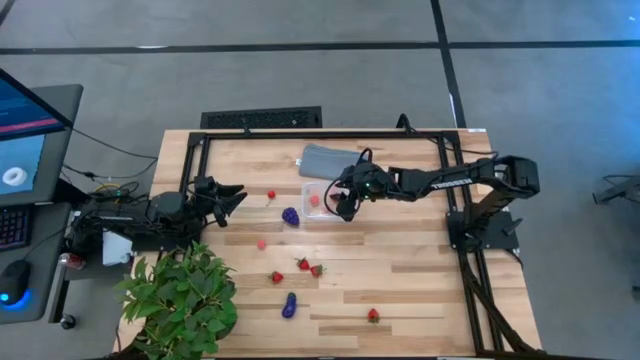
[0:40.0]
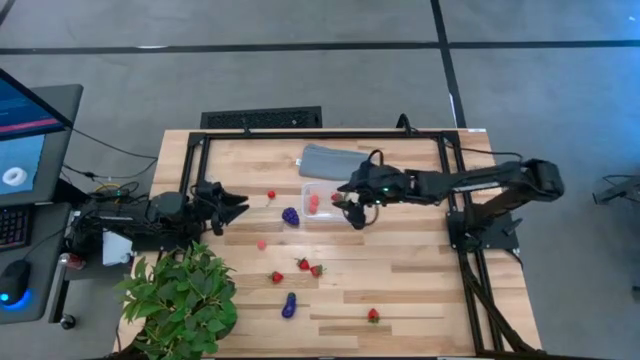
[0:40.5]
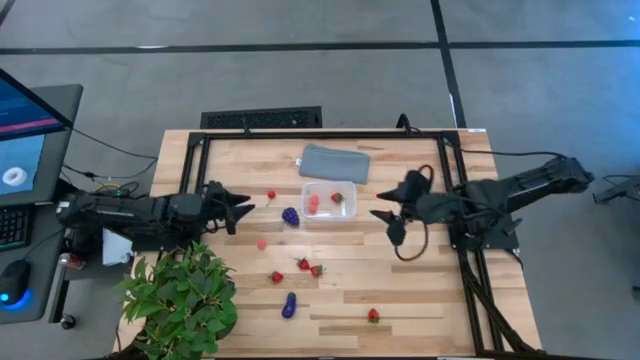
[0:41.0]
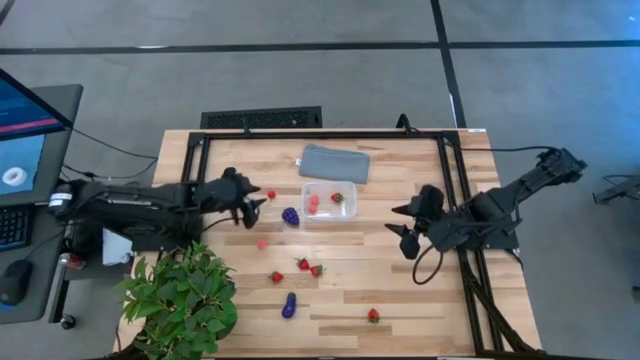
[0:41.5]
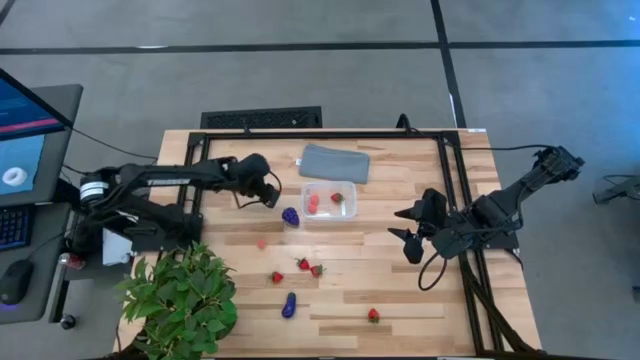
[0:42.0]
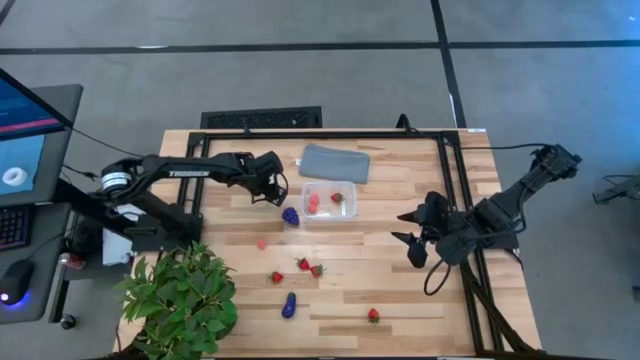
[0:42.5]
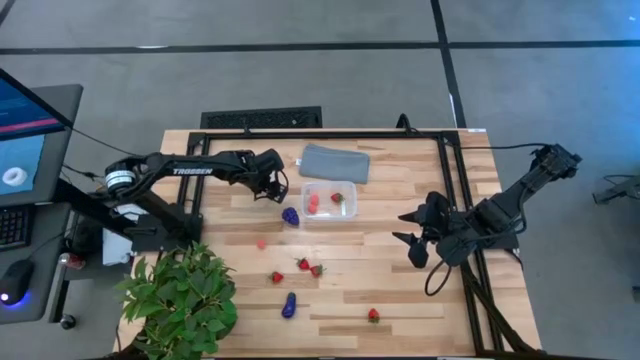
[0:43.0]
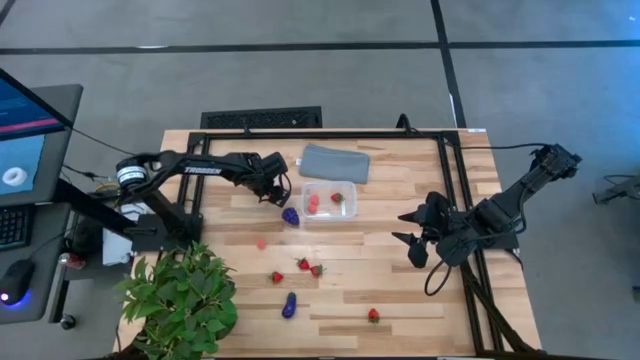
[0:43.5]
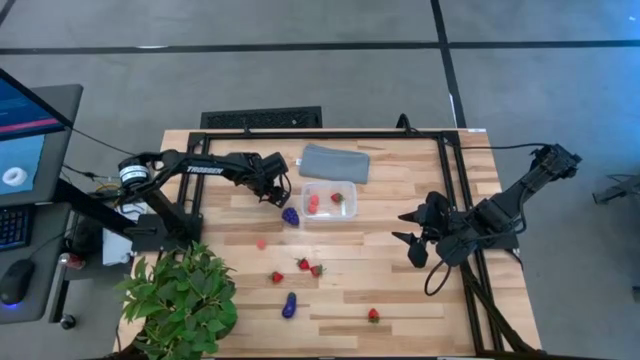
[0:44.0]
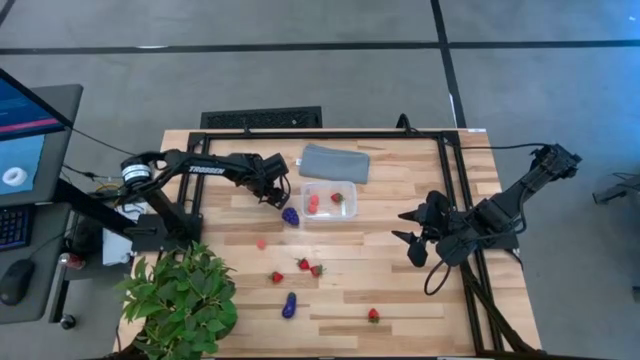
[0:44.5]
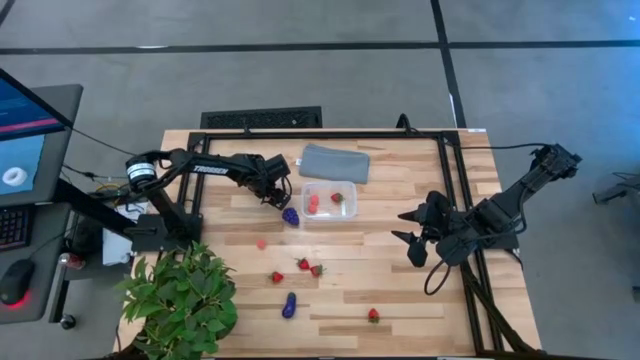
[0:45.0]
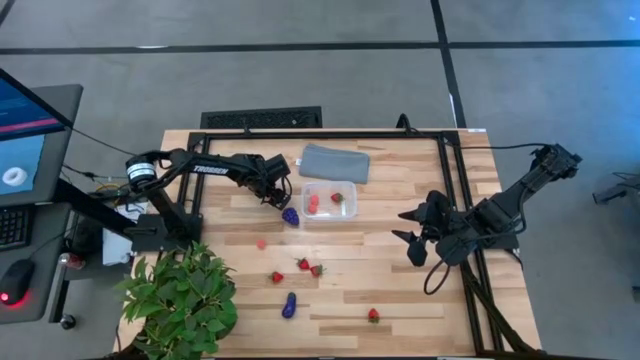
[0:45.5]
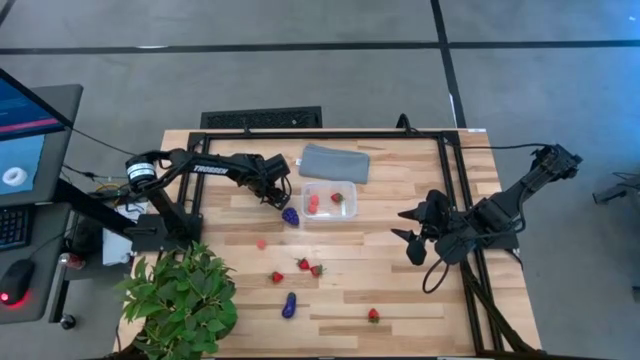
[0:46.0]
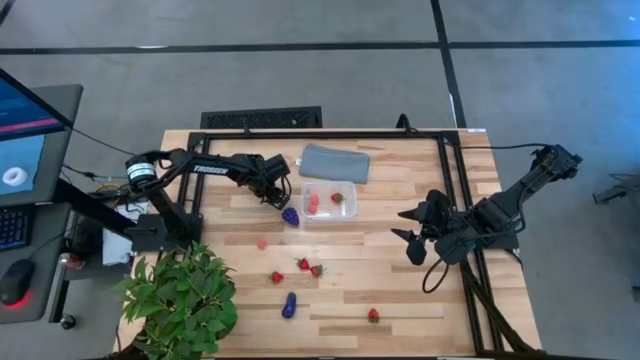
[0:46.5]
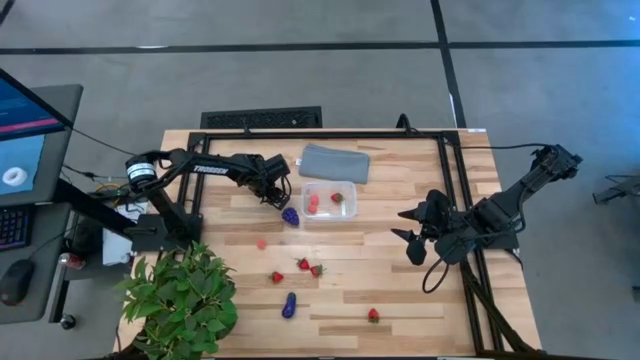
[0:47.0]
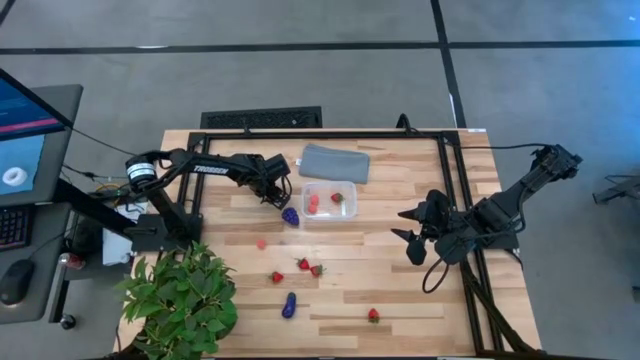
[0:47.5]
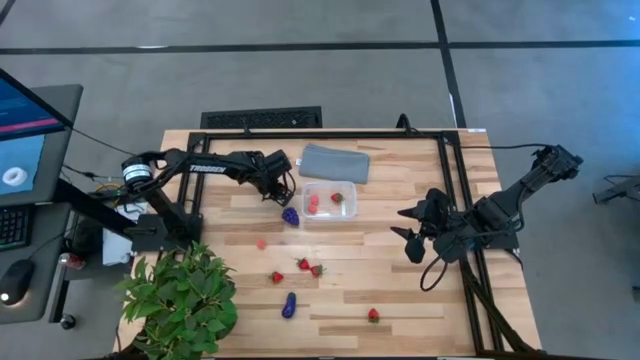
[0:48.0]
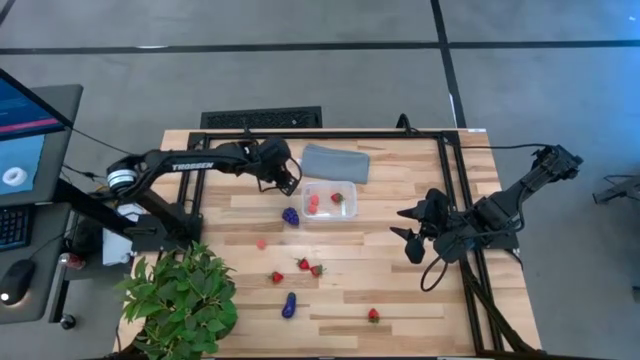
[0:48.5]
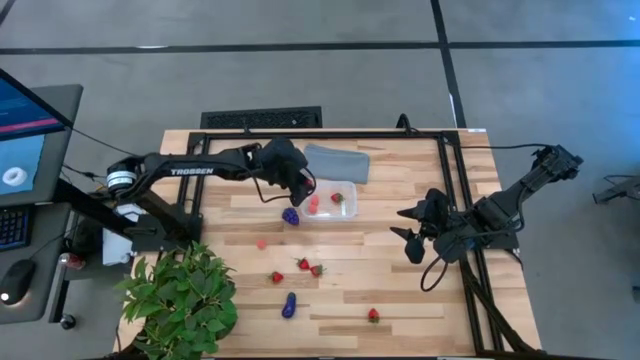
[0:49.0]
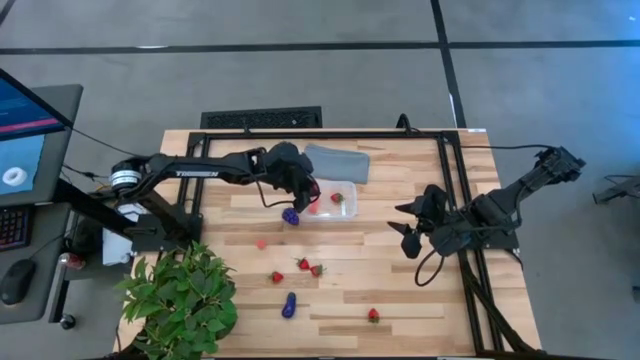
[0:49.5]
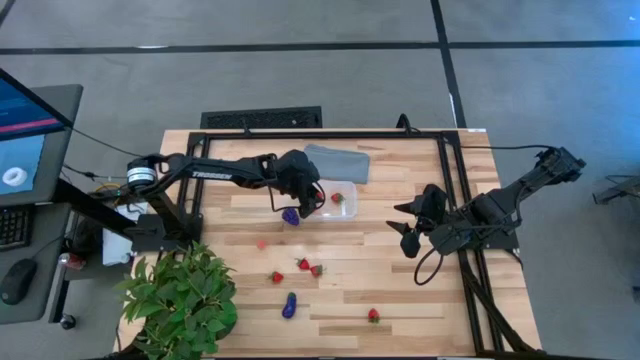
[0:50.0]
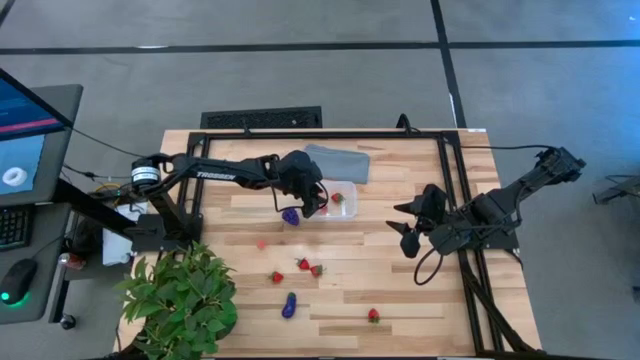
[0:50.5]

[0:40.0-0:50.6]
Task: Pick and placing Produce into tupperware
Put the red cherry into the transparent bin

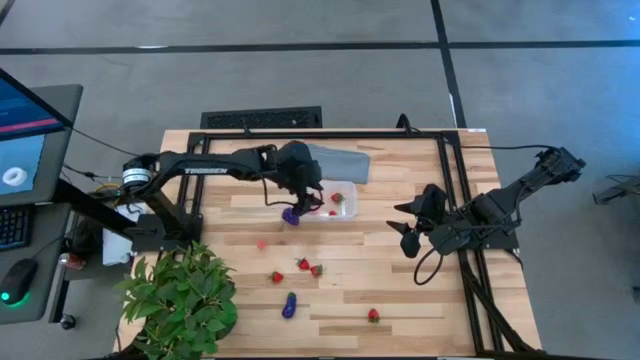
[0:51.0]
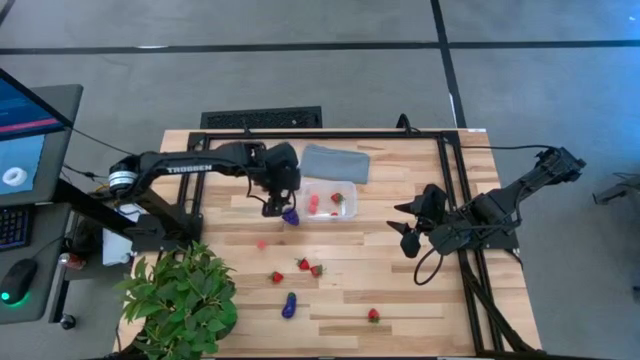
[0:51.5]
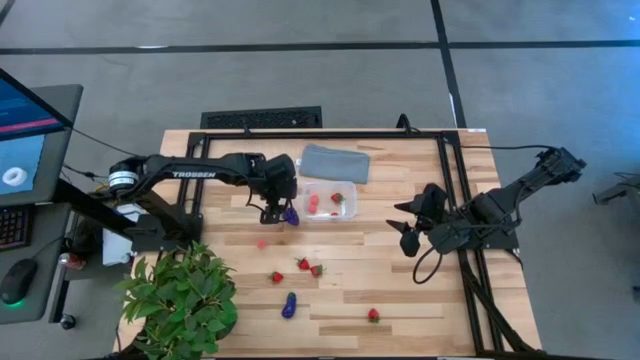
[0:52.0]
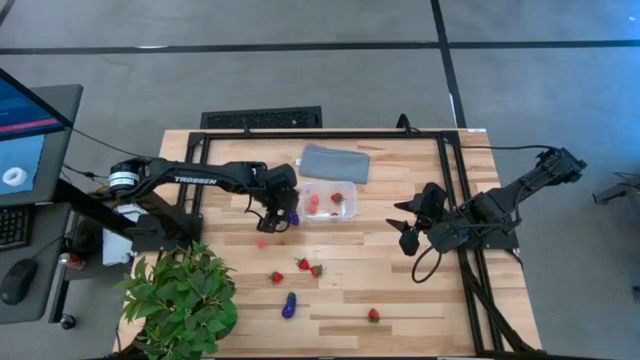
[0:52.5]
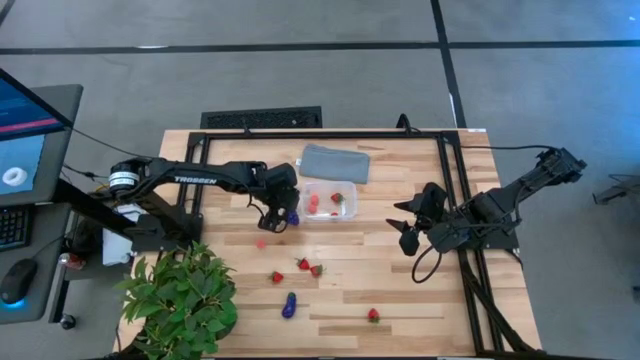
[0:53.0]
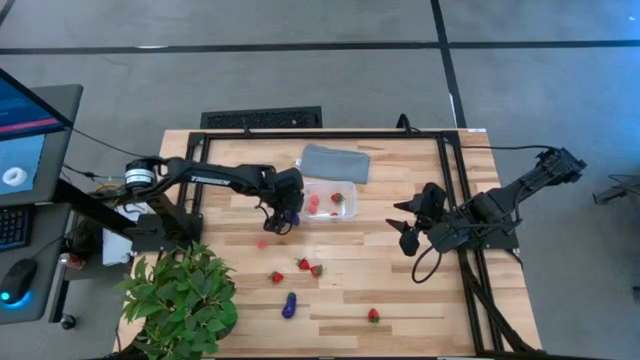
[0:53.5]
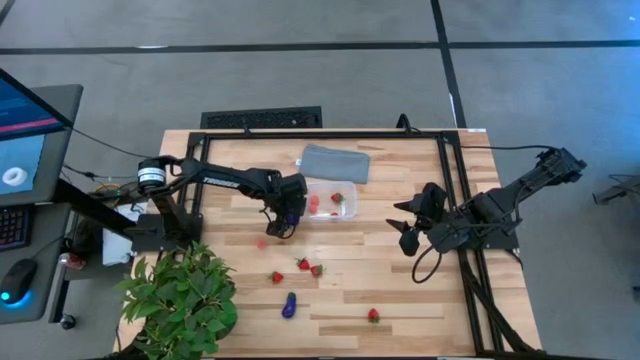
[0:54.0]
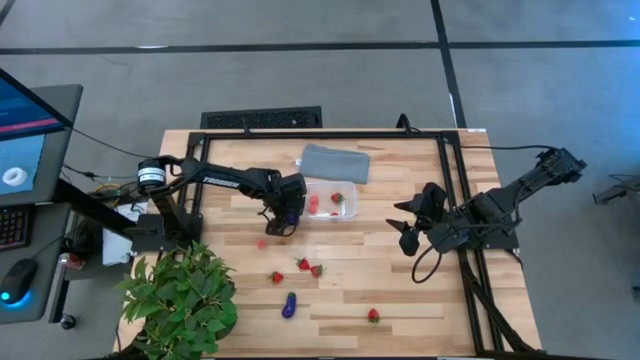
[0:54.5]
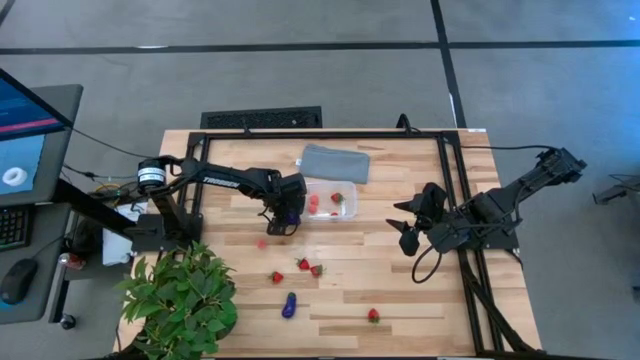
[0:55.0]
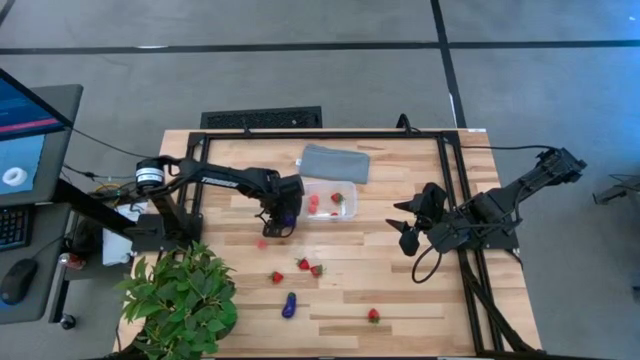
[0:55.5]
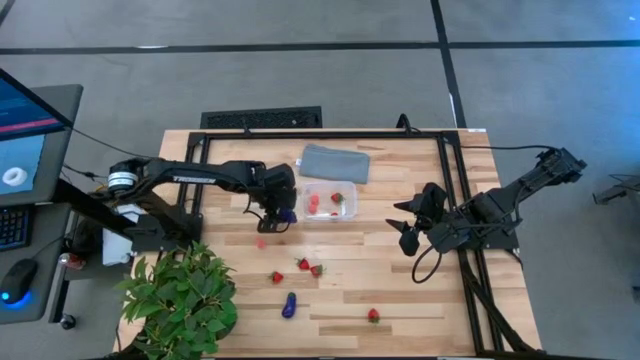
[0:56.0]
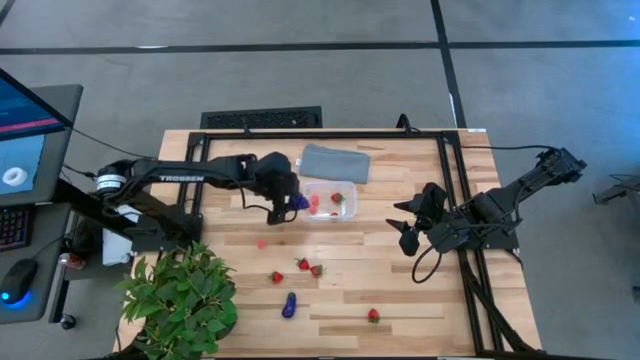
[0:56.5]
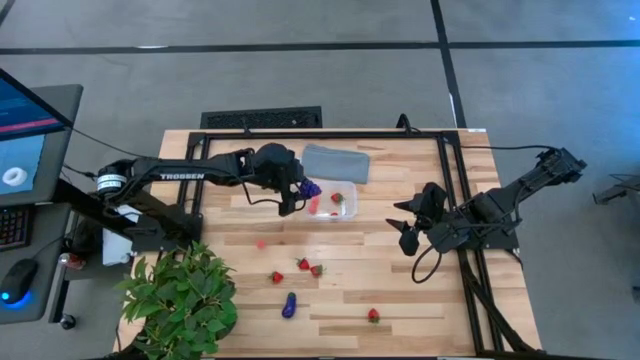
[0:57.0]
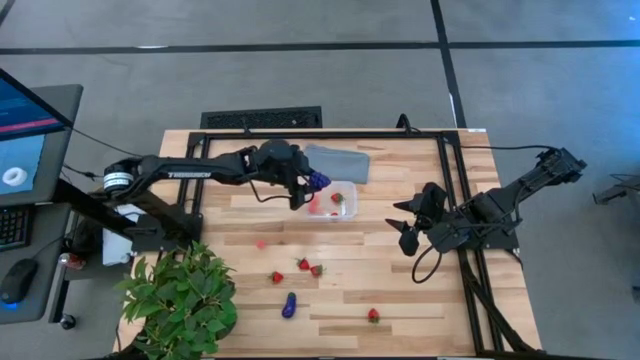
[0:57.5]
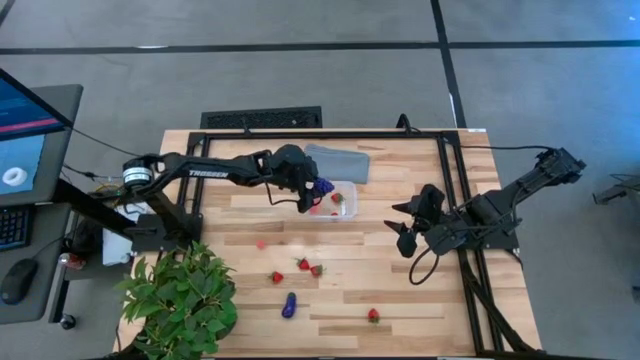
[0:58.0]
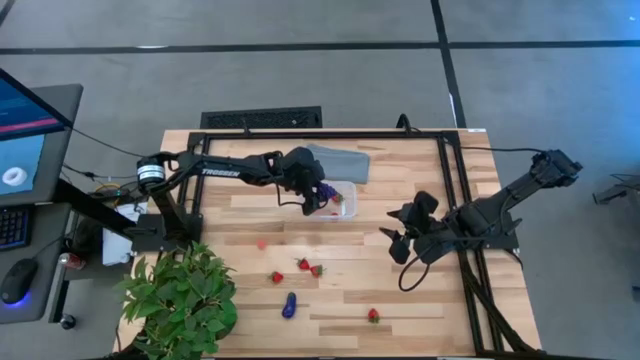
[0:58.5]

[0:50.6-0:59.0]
Put the purple grapes into the transparent bin

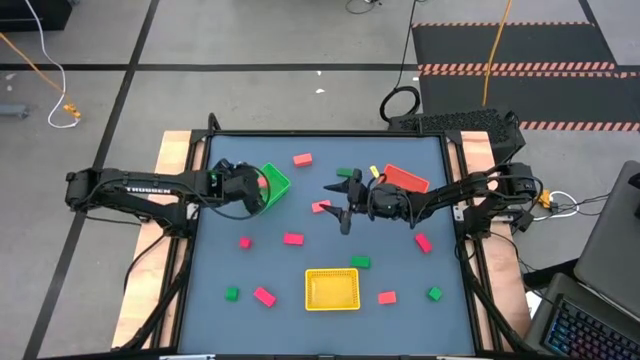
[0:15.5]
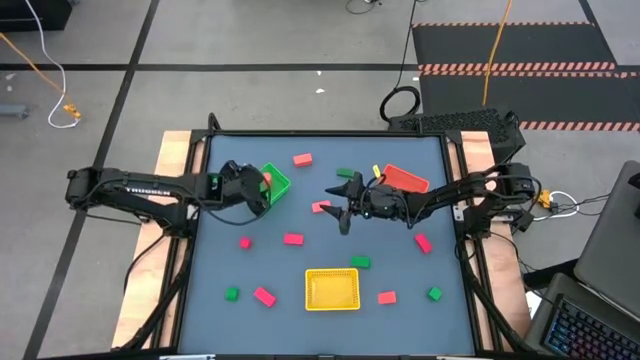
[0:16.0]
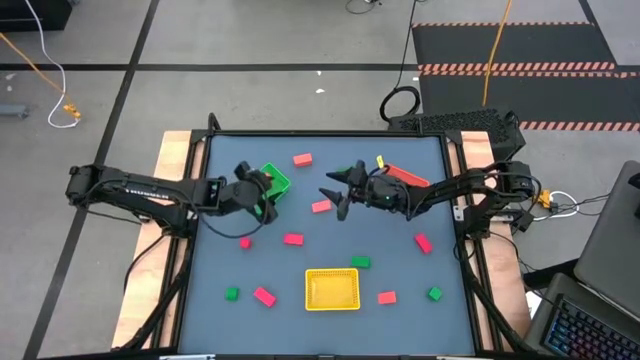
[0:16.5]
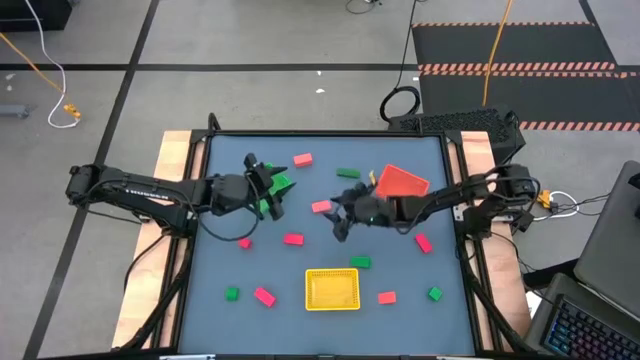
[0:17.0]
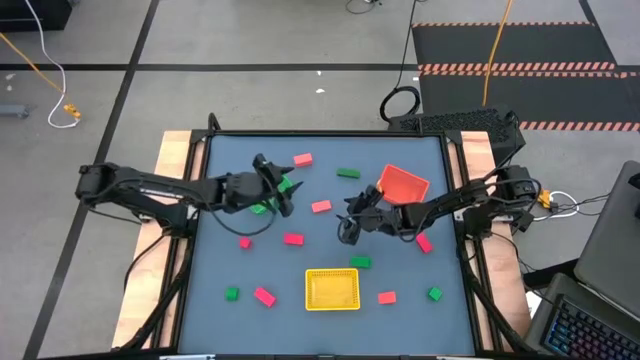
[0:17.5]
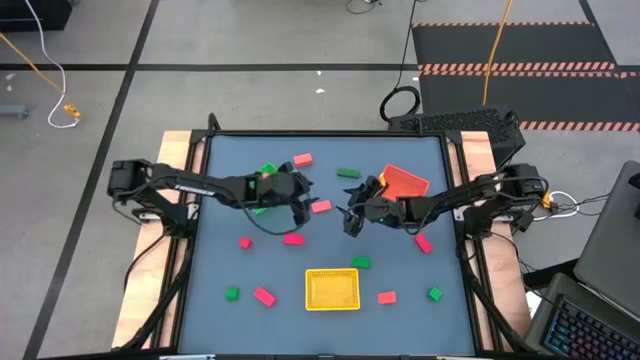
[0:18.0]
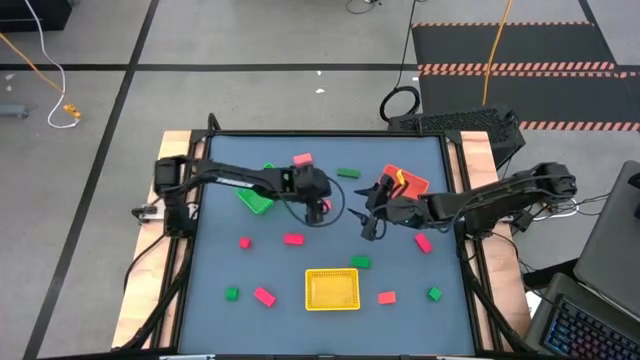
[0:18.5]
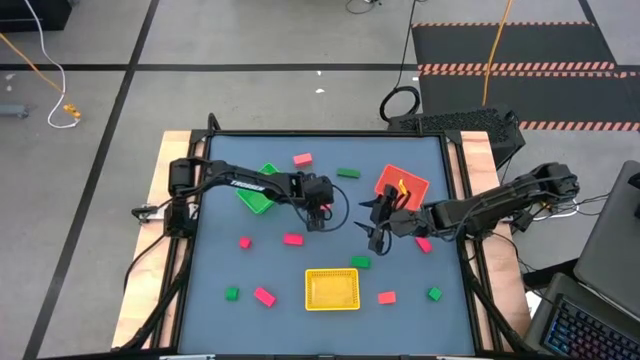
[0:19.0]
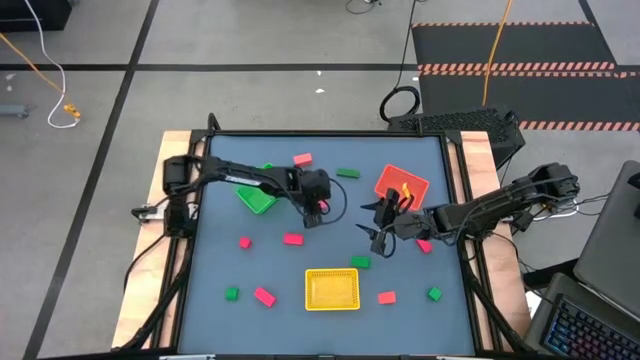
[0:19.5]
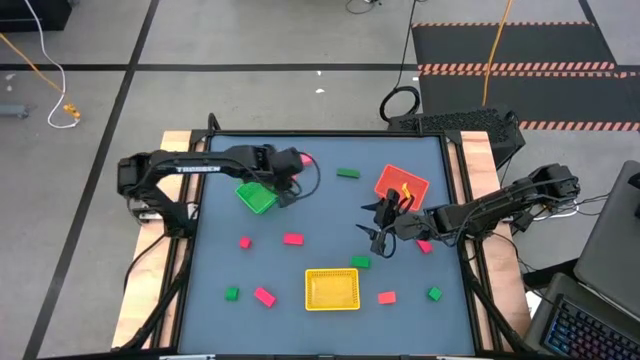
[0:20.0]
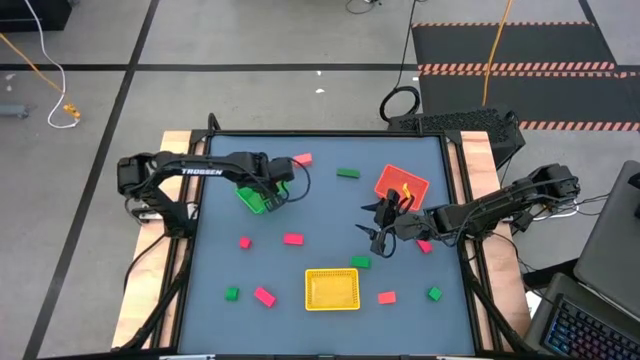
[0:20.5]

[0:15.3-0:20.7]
Task: Sort & place blocks by color
Put the orange block into the green bin
